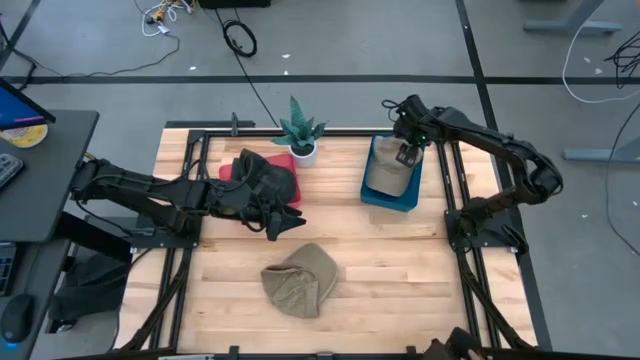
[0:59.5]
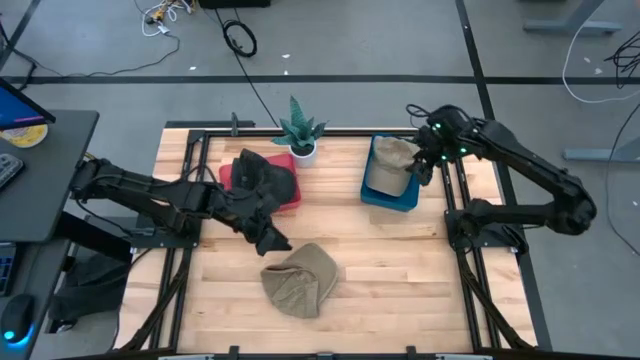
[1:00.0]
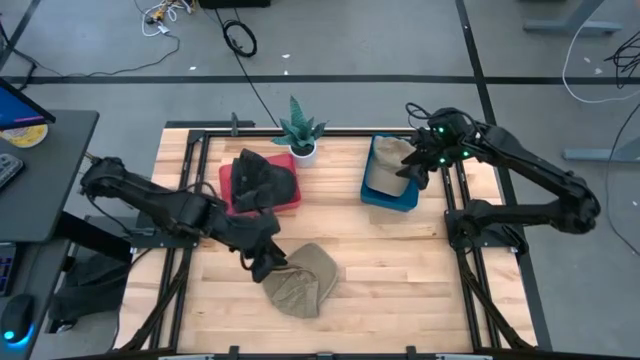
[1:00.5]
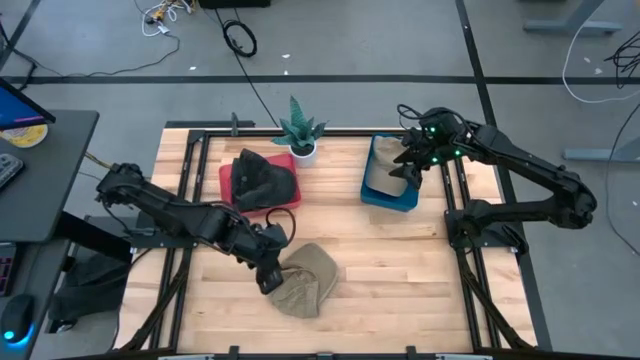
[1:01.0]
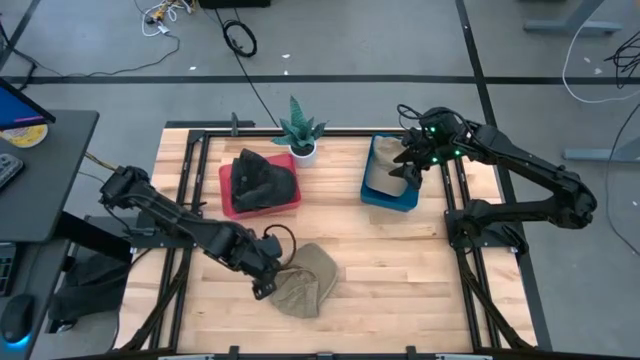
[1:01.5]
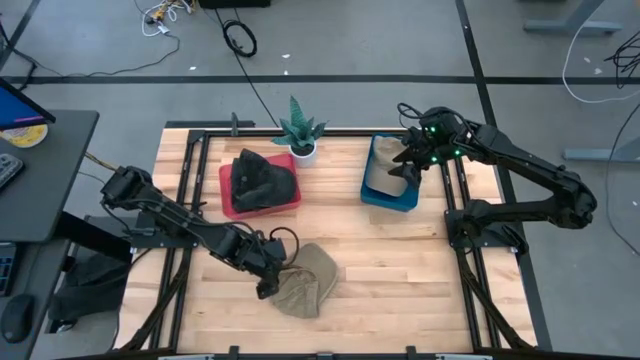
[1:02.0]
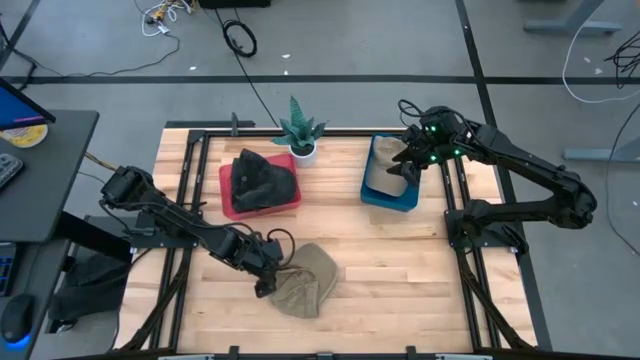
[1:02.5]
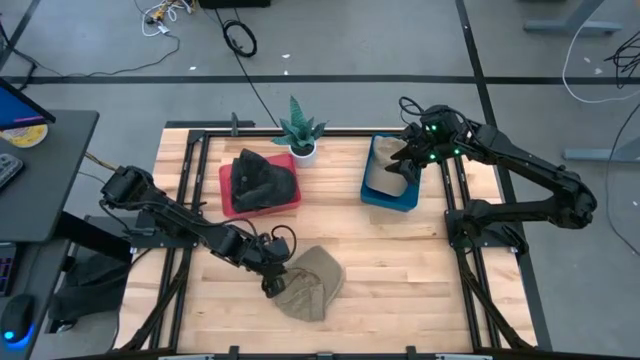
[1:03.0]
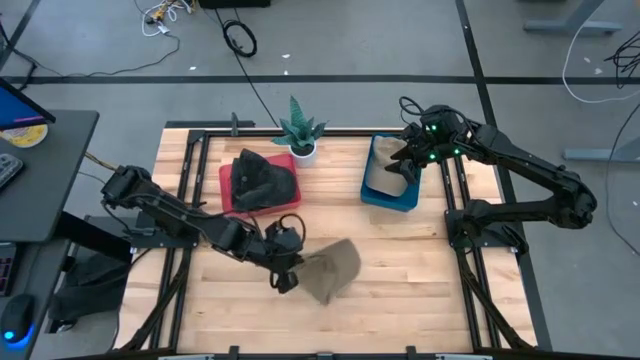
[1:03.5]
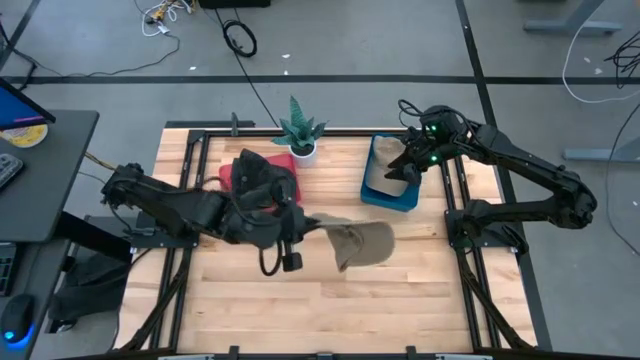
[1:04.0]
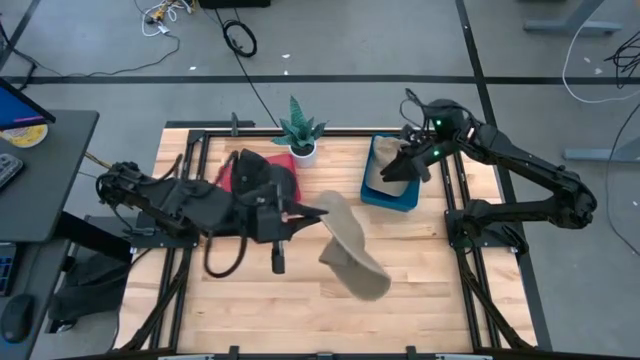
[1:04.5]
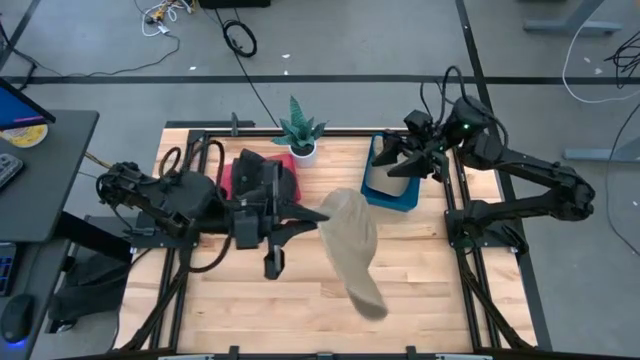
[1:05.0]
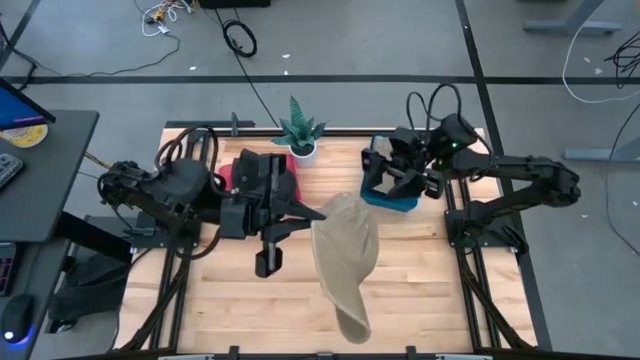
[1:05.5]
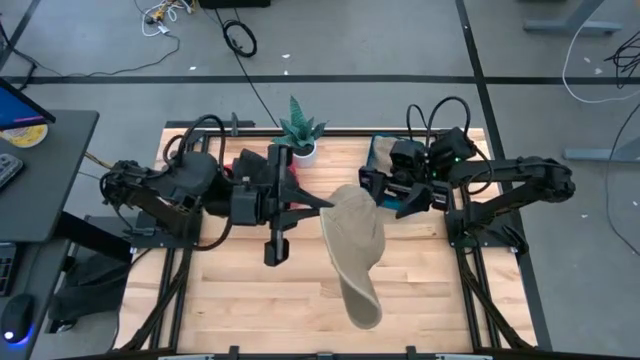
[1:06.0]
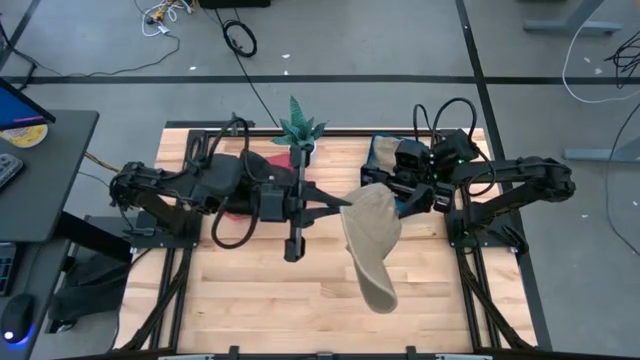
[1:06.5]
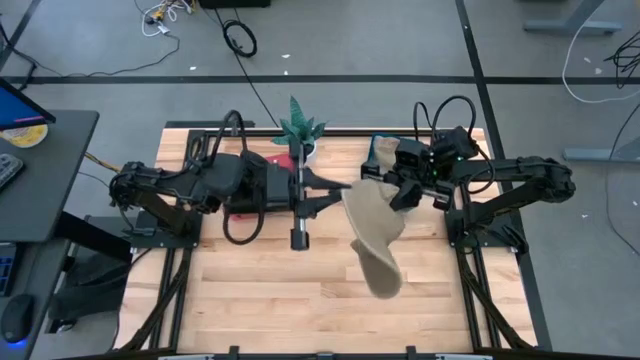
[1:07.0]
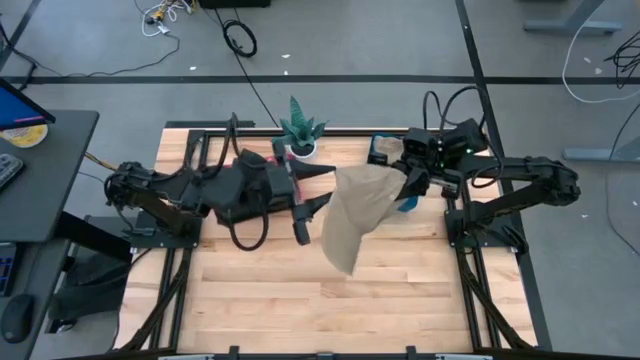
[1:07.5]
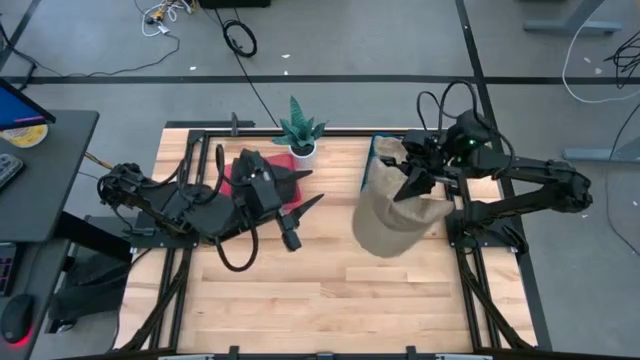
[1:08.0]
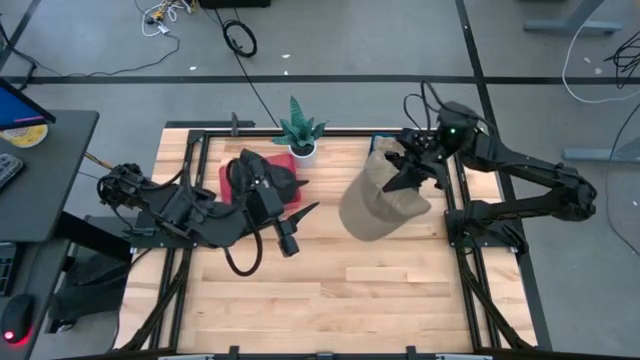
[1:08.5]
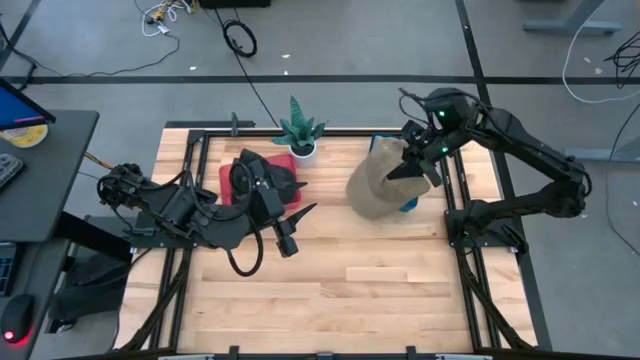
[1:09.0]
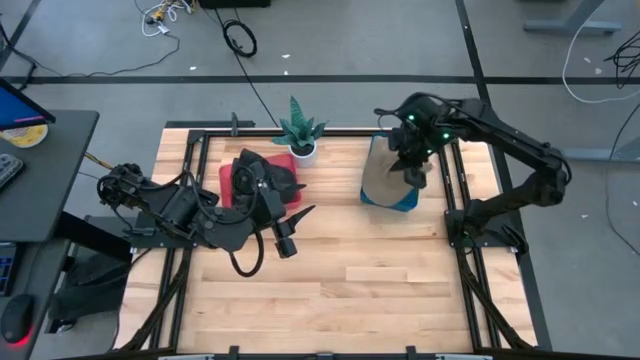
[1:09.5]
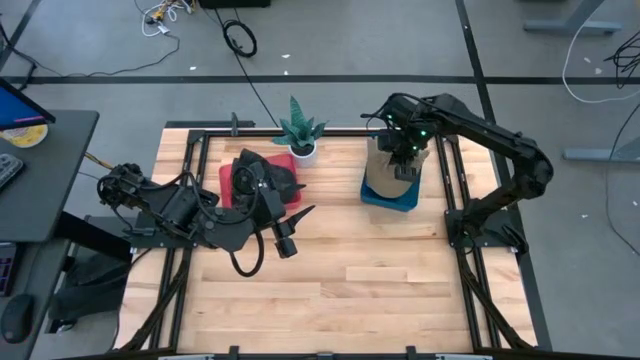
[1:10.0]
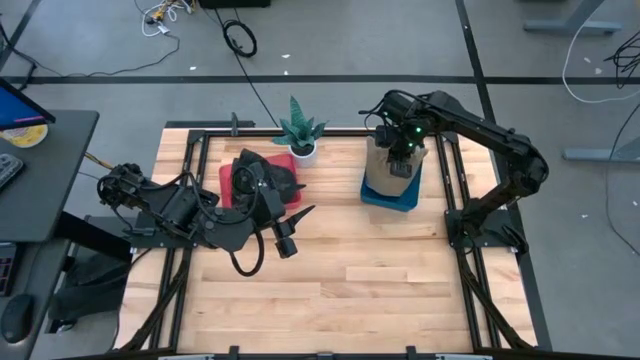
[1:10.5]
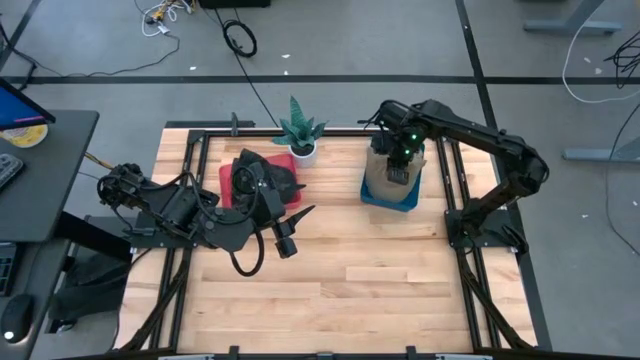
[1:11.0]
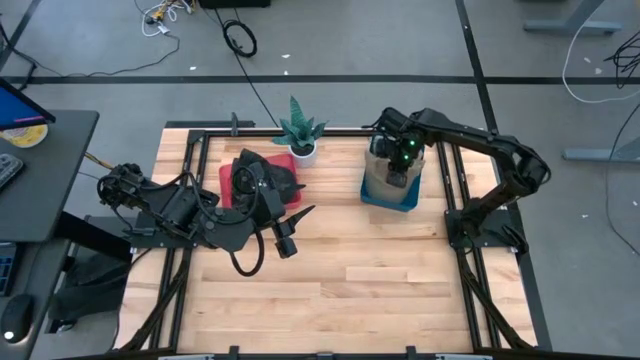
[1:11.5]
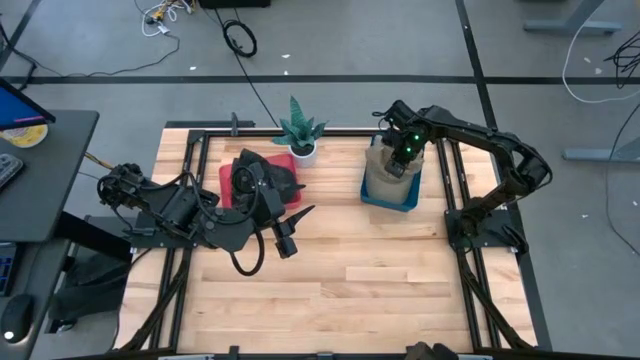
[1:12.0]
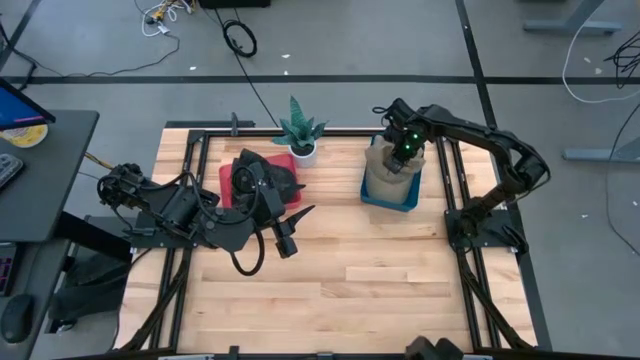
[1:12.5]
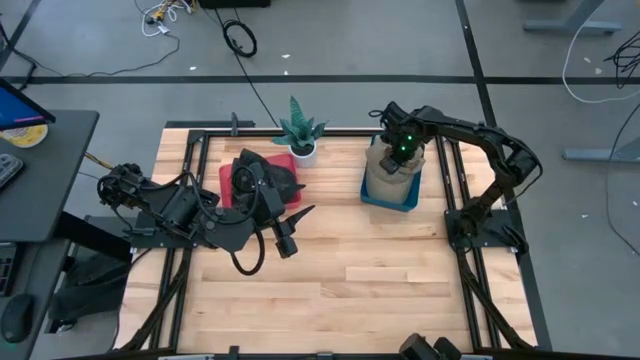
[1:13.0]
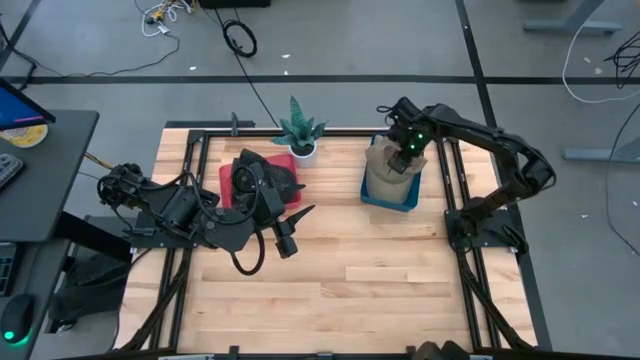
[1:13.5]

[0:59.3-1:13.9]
Task: Pick & Place hat
Put the brown cap into the blue bin

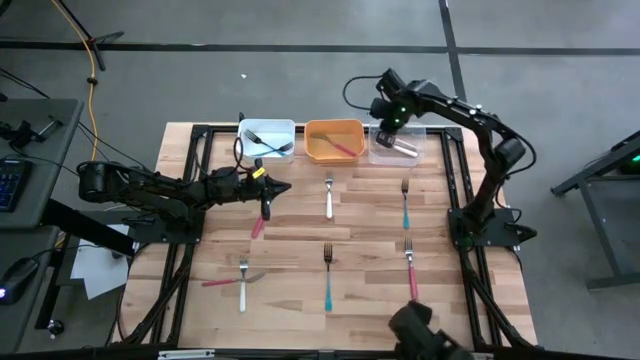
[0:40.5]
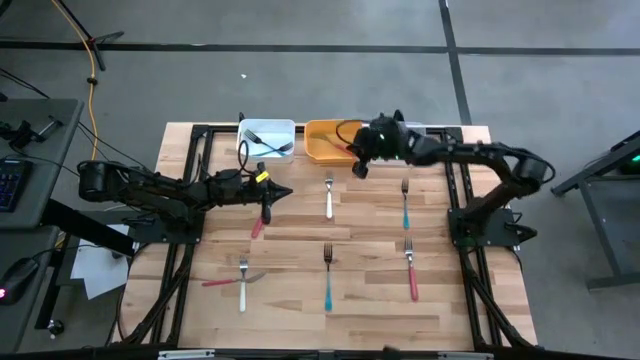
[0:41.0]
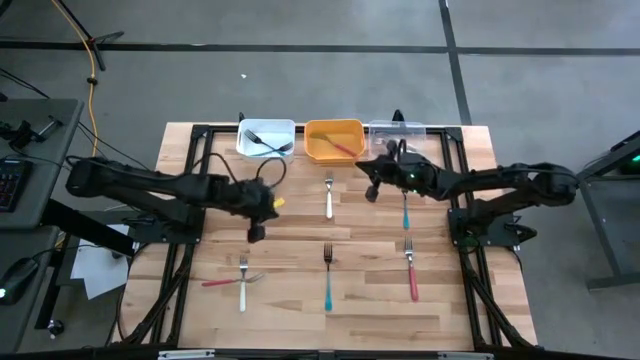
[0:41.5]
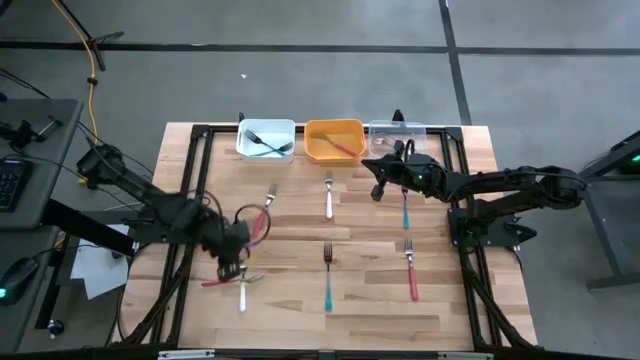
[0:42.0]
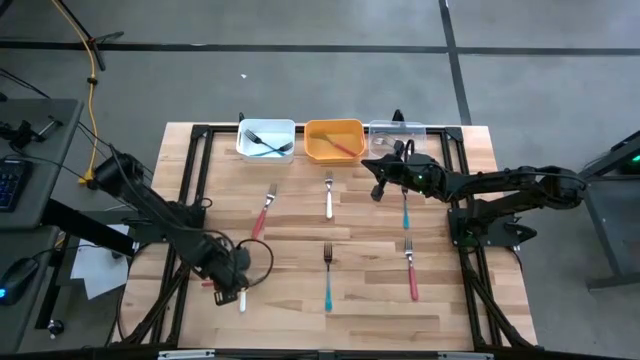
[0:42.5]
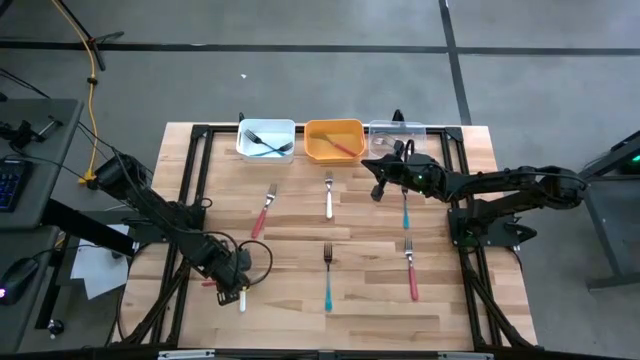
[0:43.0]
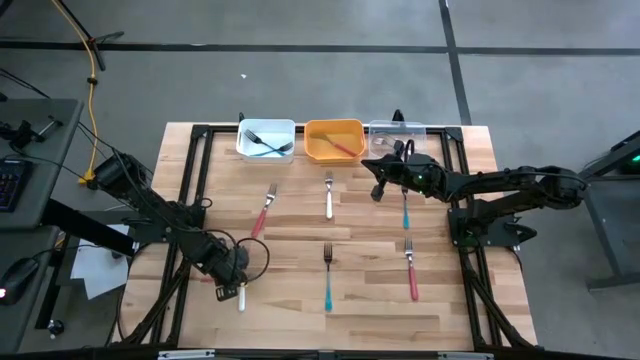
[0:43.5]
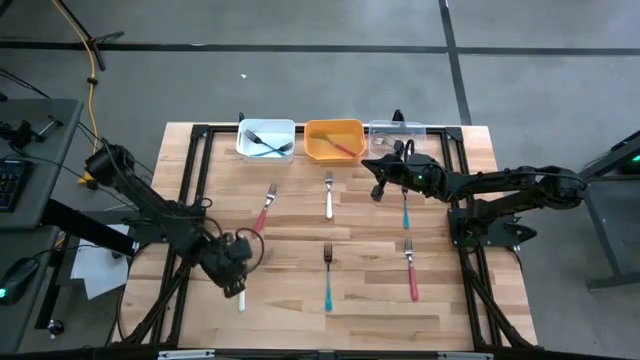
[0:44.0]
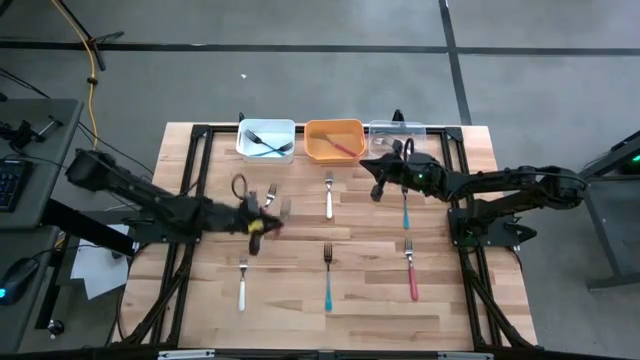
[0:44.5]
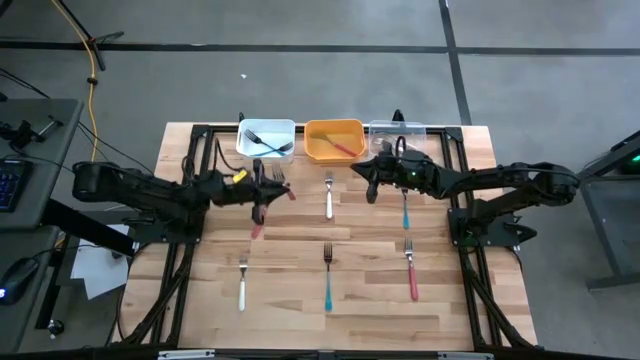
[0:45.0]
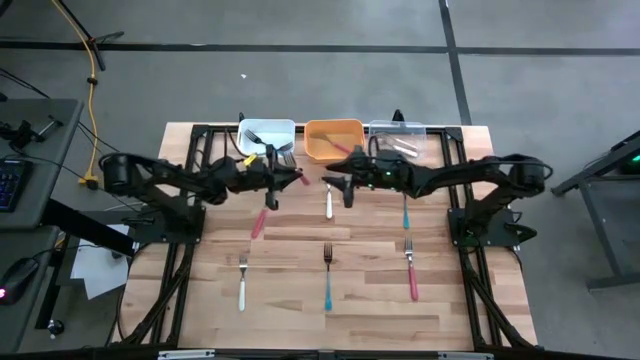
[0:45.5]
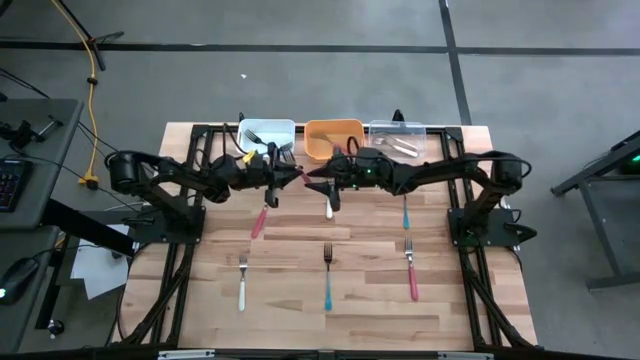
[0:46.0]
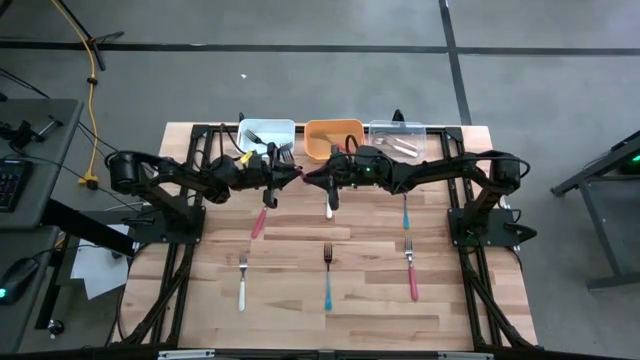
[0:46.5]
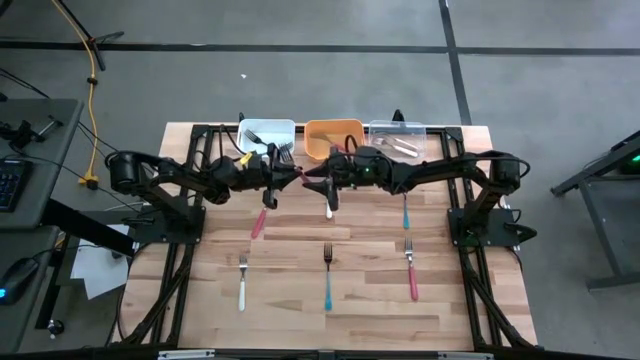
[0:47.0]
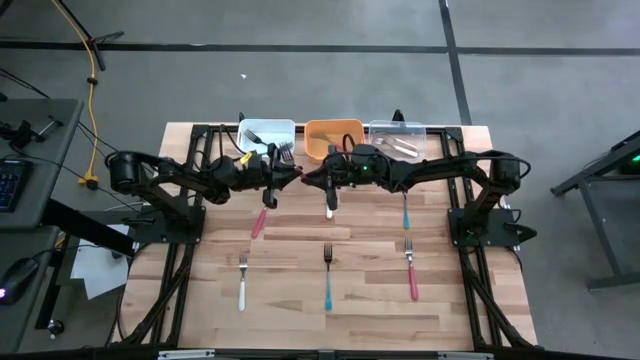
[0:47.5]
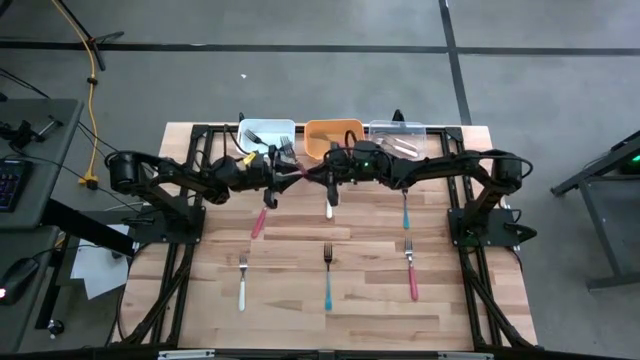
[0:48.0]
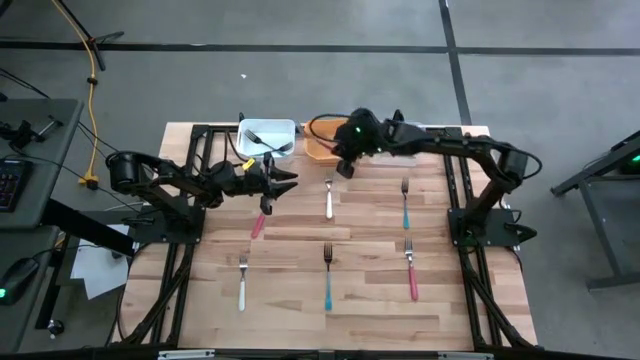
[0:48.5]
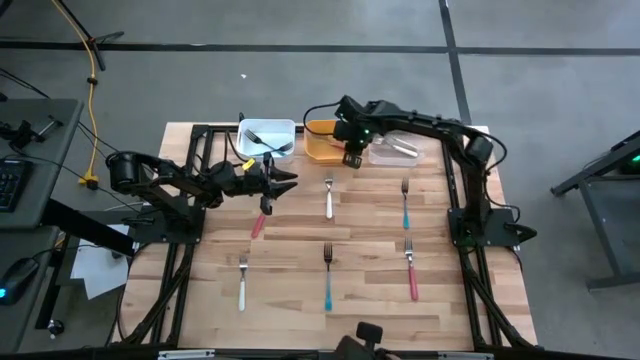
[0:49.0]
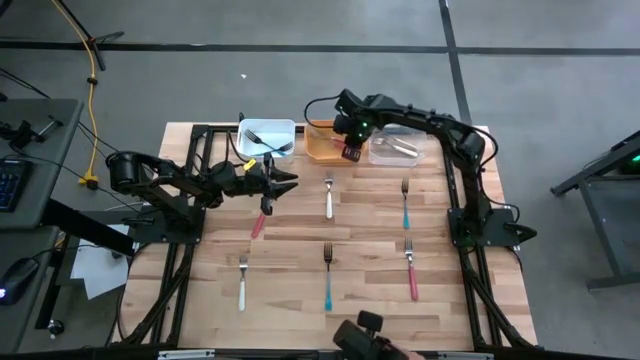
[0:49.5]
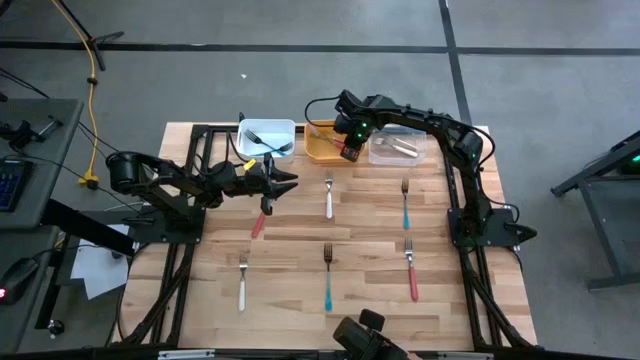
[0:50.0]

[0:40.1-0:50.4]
Task: Sort silverware by color (type)
Put the bottom left pink fork into the yellow bin
